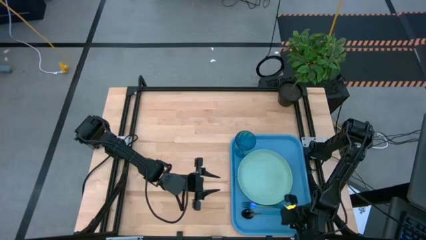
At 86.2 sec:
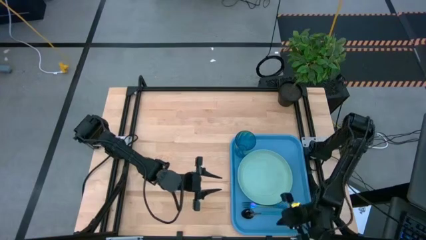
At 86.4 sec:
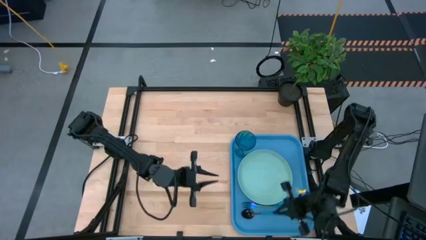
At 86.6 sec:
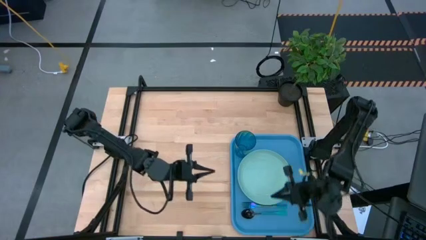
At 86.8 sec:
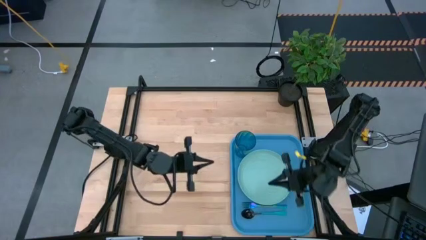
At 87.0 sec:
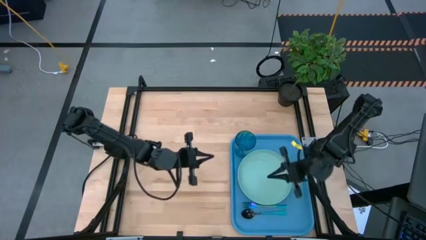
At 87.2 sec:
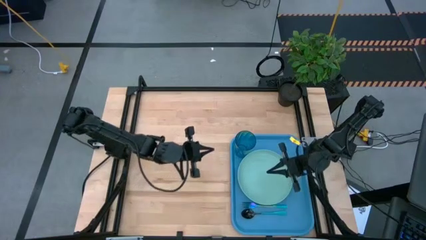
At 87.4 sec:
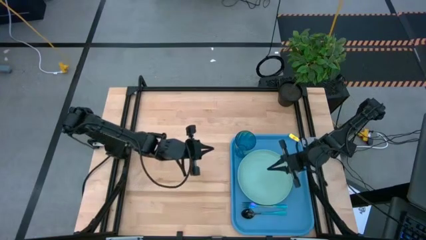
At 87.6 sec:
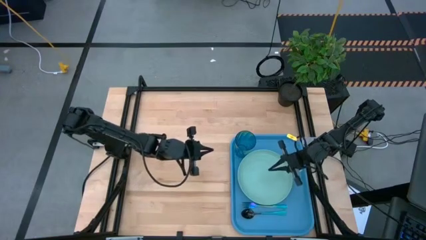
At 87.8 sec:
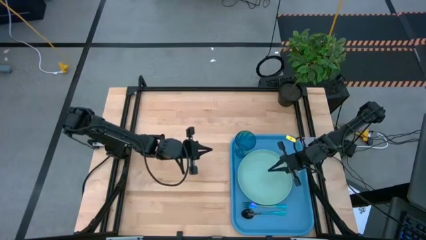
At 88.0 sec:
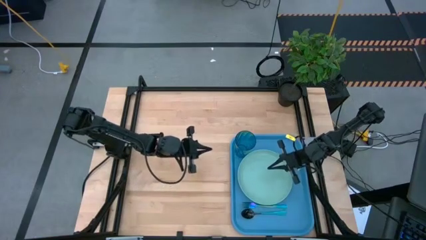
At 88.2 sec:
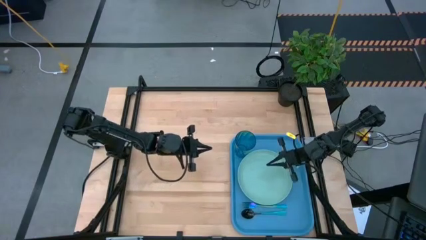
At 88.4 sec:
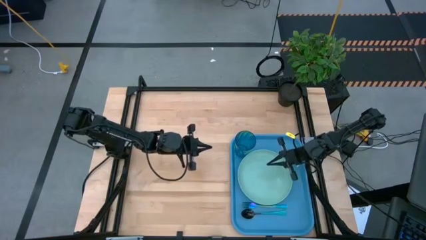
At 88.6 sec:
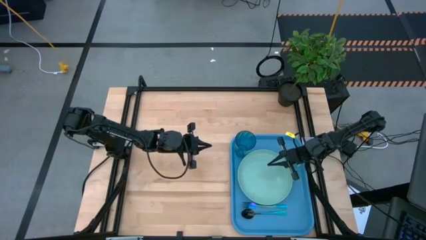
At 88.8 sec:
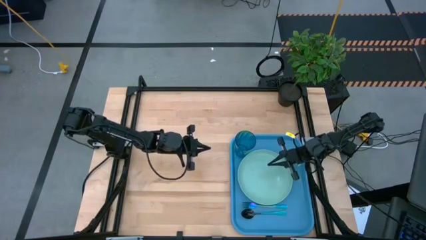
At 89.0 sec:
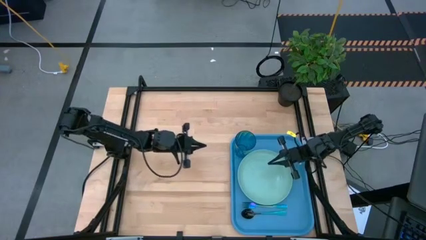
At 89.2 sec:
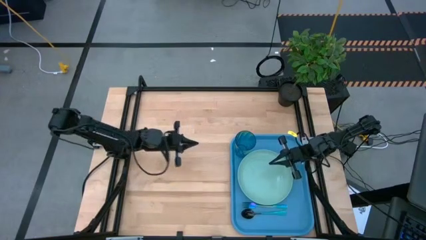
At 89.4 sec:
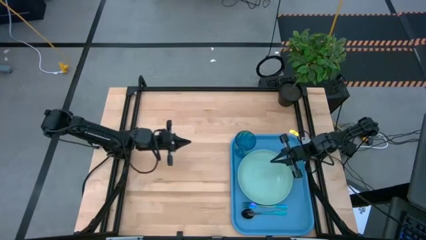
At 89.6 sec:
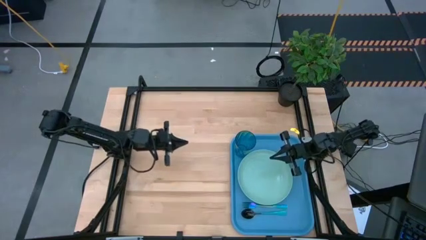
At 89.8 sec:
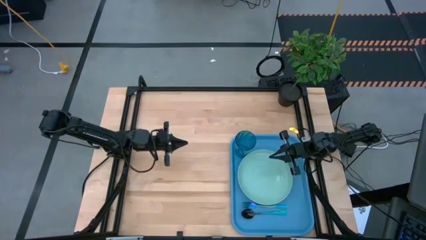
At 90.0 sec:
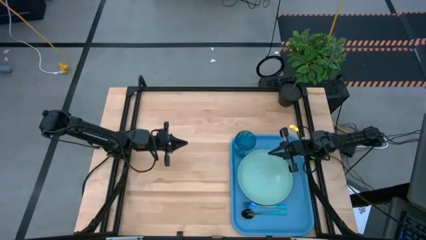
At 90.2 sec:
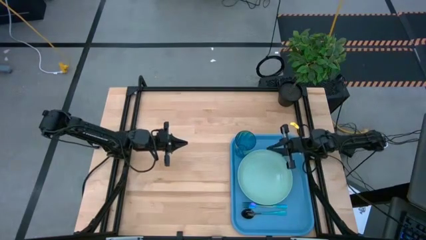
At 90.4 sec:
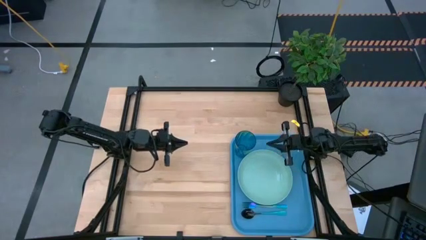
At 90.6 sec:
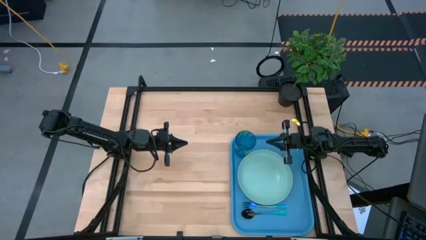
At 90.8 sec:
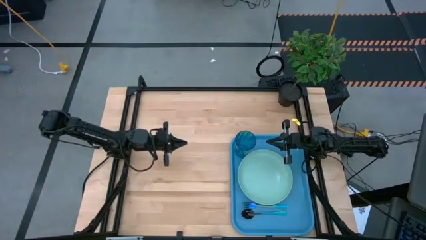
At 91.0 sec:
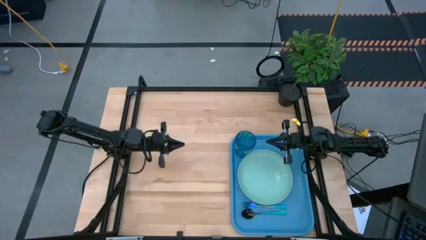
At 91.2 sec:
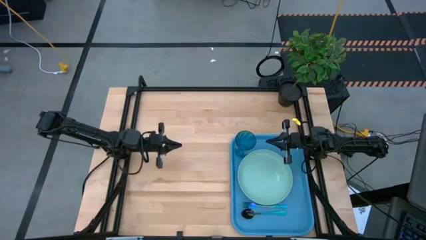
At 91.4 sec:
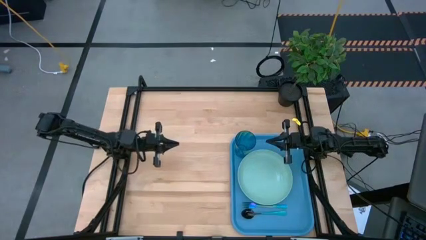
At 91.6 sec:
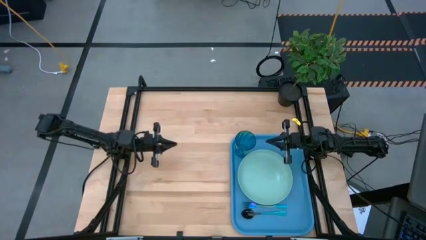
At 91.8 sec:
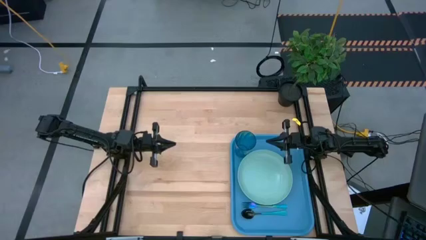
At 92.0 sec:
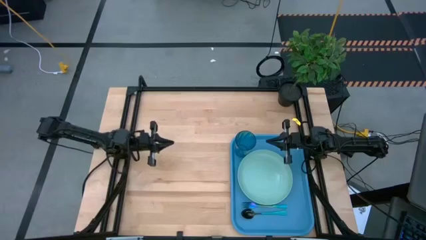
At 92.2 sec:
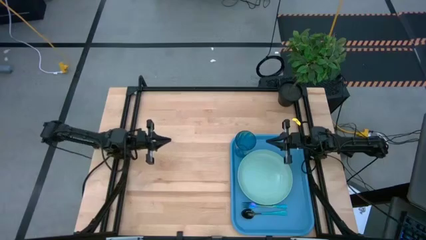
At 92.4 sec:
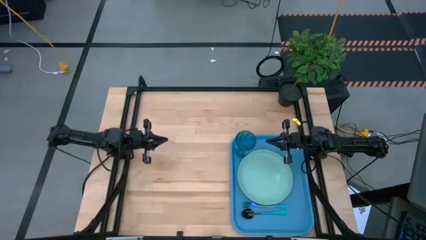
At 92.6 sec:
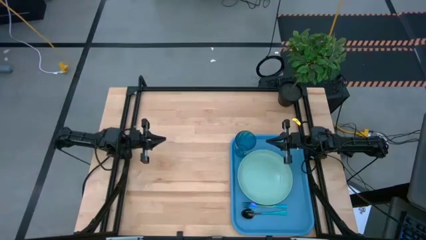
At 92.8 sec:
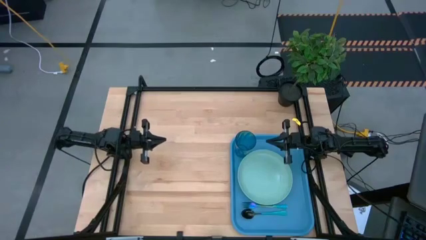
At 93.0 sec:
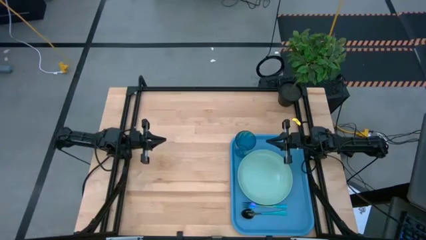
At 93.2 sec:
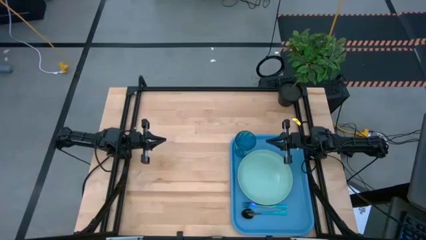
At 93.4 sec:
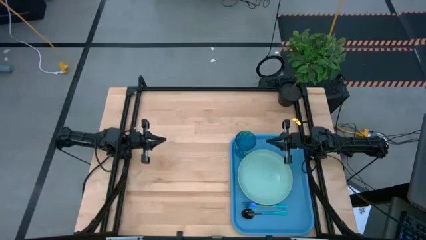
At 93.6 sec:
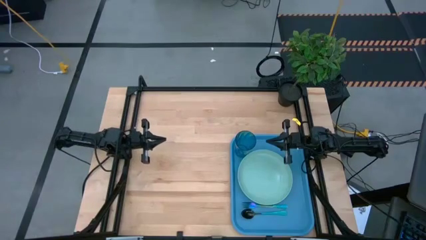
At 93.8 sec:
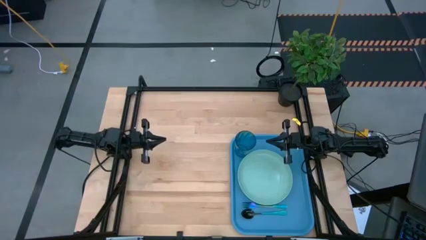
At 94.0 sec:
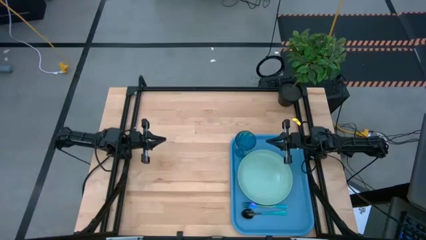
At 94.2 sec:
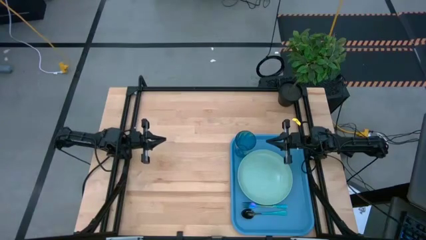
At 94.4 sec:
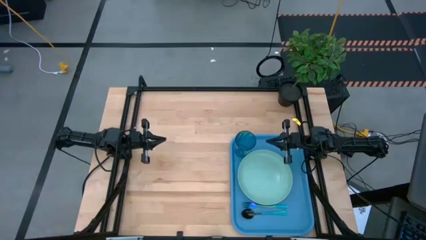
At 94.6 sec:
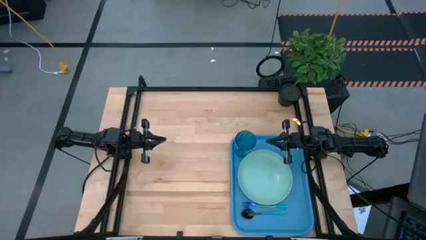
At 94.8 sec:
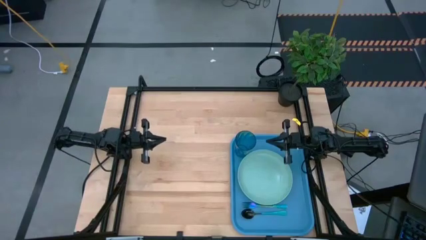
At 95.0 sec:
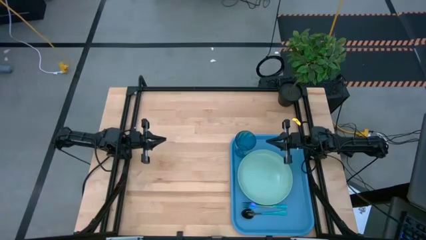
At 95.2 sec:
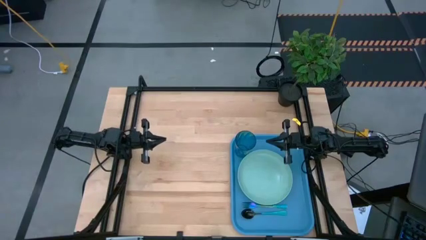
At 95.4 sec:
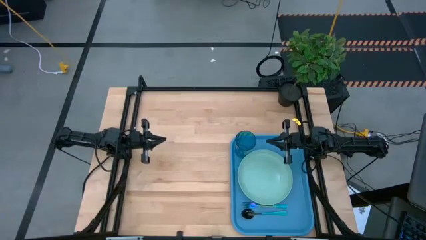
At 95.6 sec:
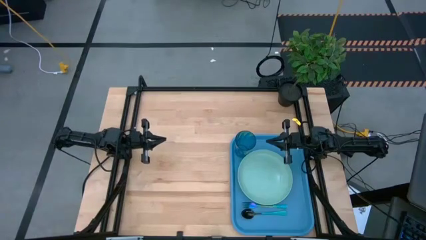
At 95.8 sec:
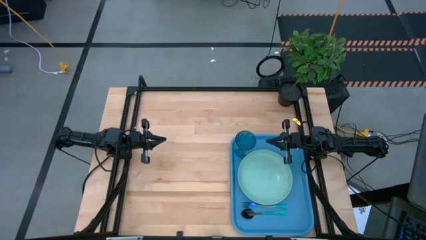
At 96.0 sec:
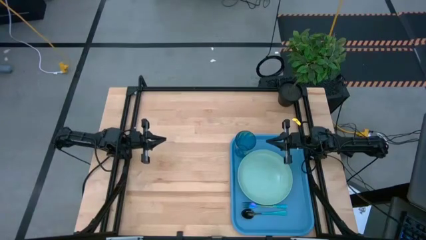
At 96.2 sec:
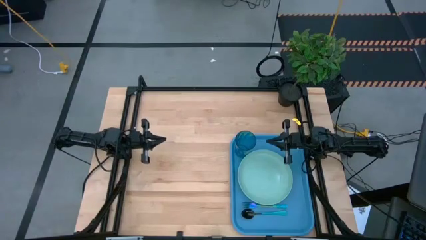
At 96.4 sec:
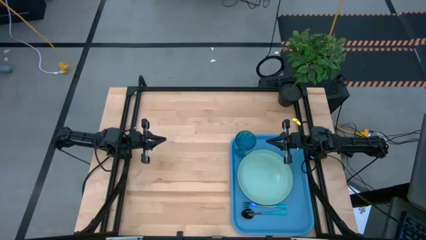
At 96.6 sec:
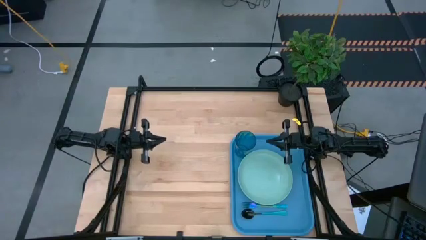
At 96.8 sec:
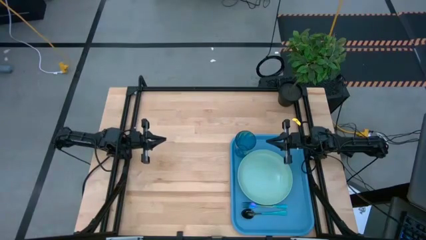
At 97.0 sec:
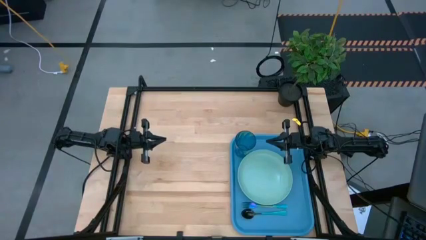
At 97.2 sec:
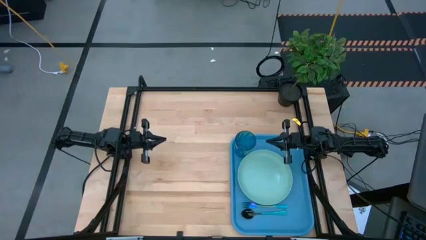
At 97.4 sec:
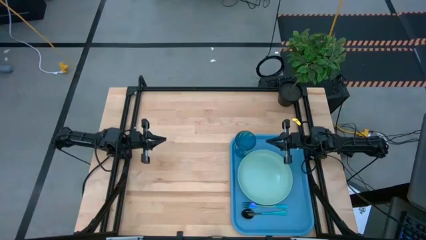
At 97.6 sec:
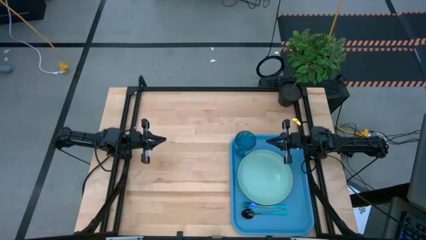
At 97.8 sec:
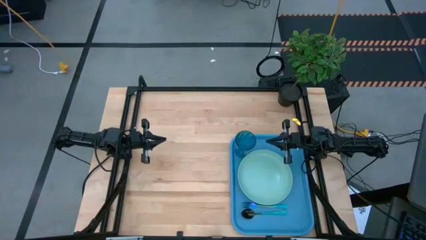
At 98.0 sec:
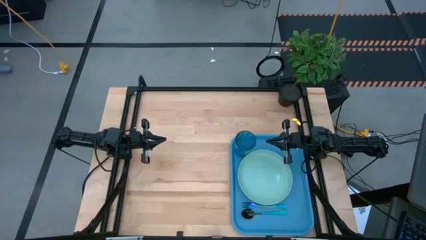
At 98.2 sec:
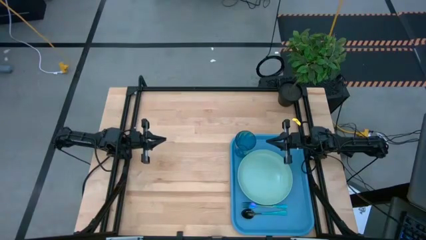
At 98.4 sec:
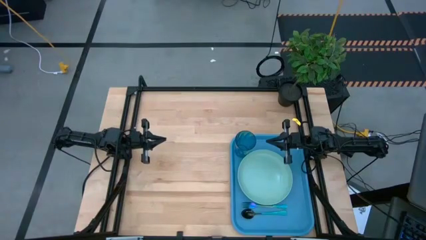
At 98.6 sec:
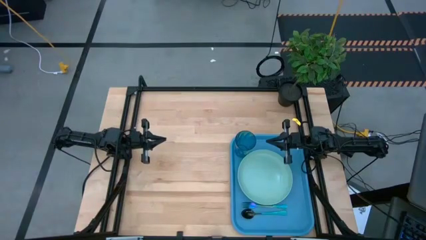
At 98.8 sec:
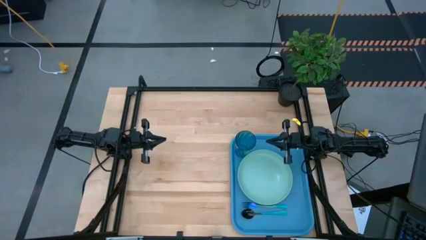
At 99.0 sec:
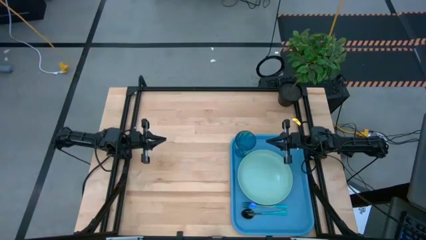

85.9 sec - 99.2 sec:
Task: Pick and place plate/cup/fork/spoon on tray
Return to Home Position
